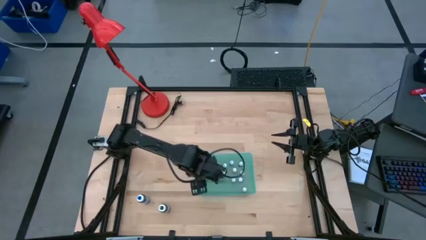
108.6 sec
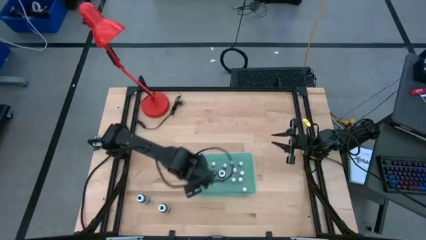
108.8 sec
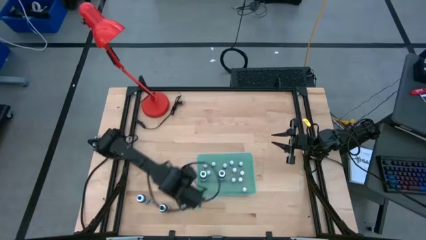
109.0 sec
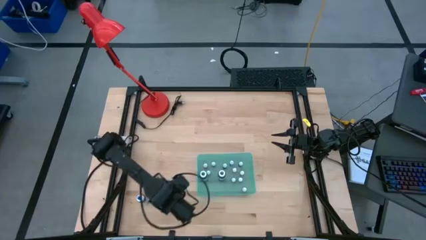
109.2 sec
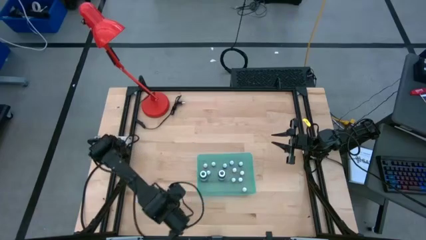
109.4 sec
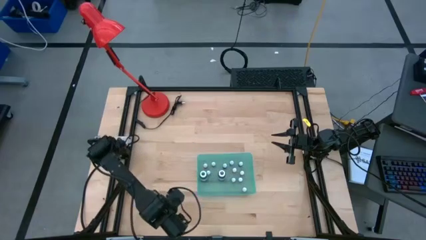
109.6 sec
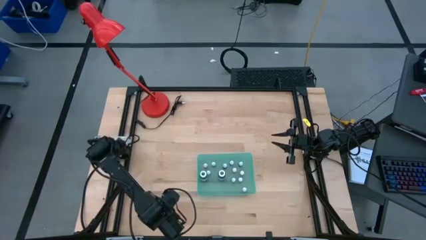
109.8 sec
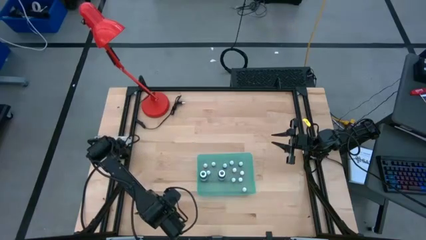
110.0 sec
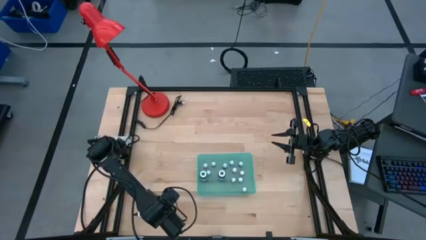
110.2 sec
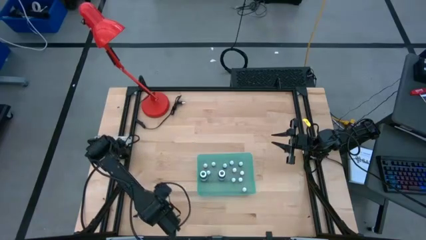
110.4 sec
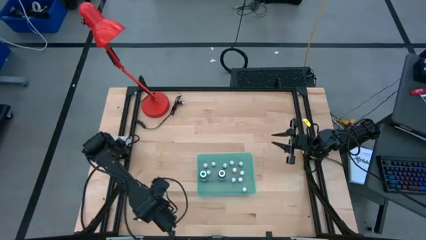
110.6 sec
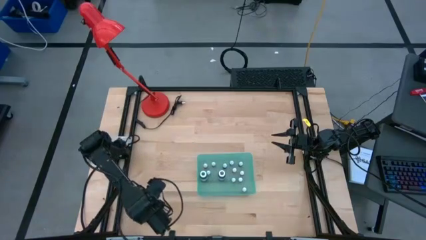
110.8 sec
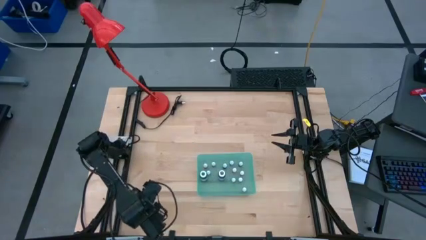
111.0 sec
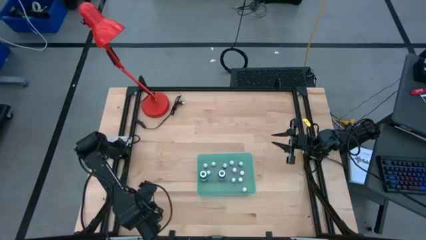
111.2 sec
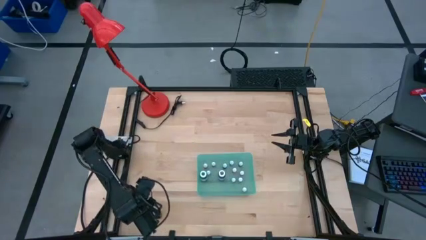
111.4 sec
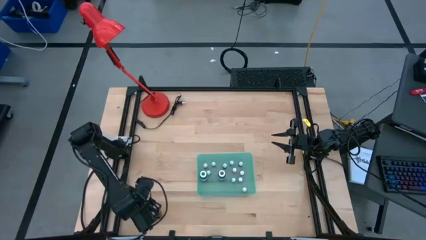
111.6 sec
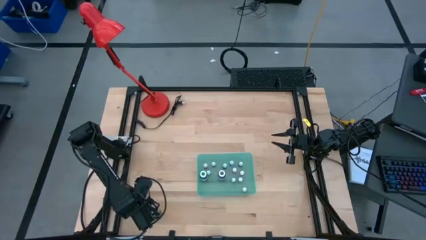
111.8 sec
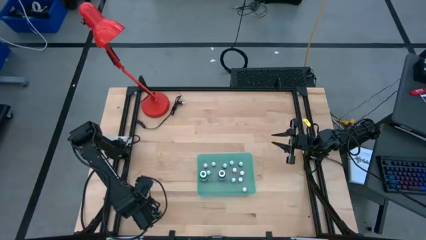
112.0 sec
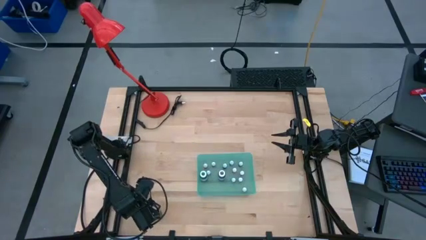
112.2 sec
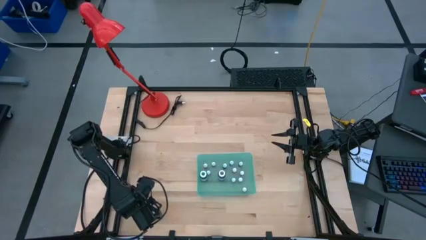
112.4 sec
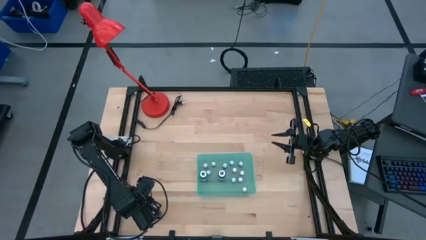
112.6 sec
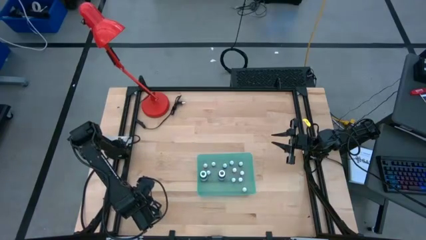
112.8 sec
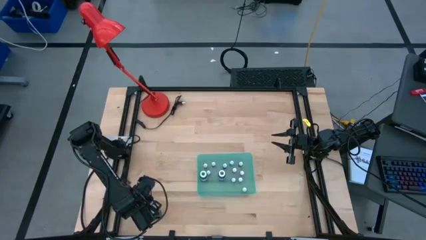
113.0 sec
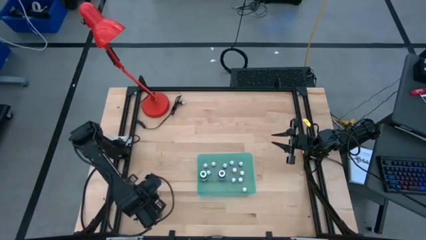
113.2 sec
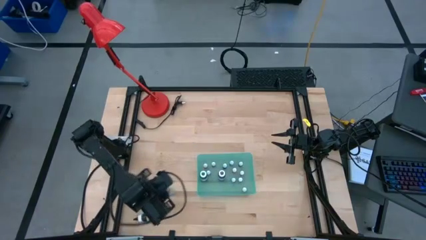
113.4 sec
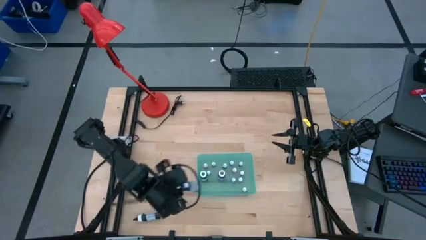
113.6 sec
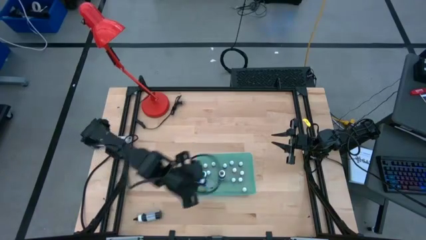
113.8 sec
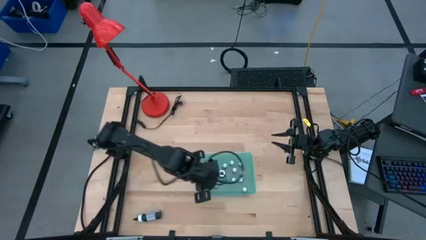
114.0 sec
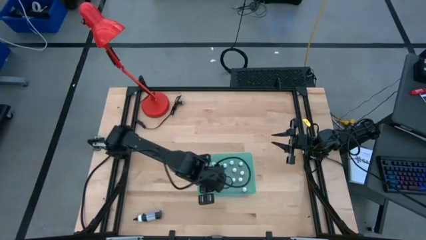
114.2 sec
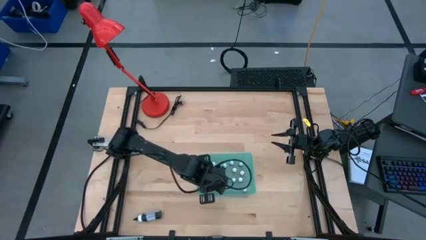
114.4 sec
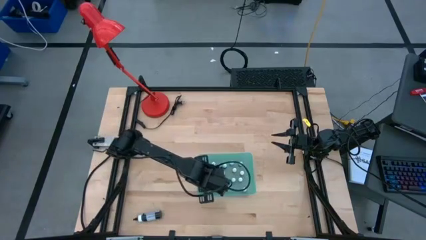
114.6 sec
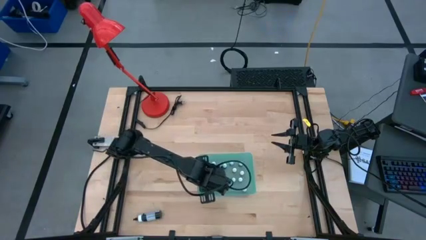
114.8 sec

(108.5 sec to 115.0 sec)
Task: Pick & Place food coloring
Put the large blue food coloring bottle into the green bin

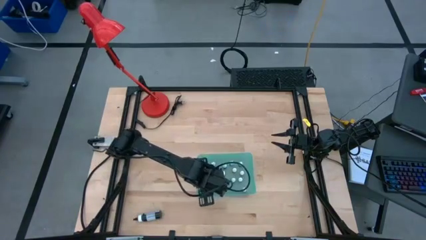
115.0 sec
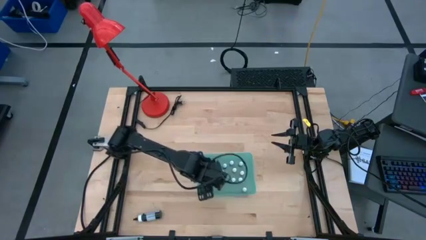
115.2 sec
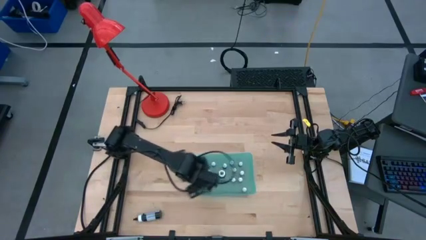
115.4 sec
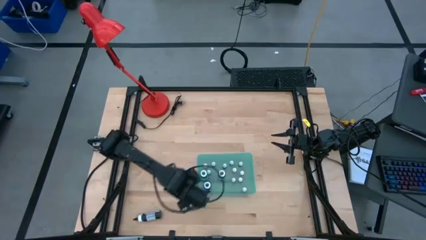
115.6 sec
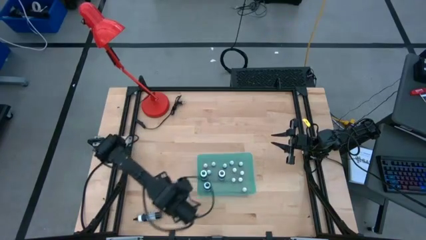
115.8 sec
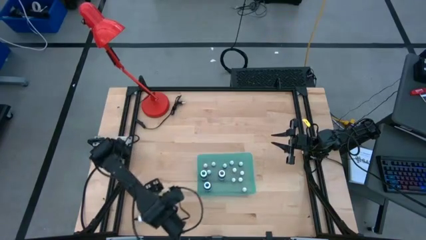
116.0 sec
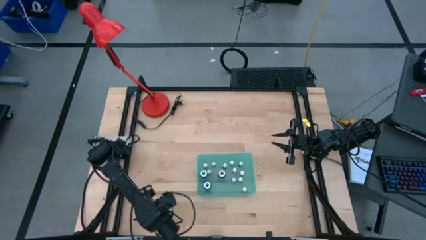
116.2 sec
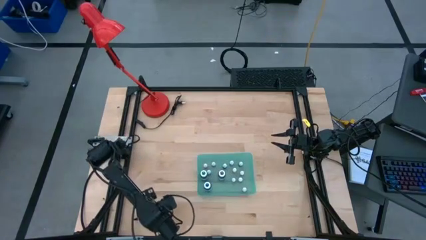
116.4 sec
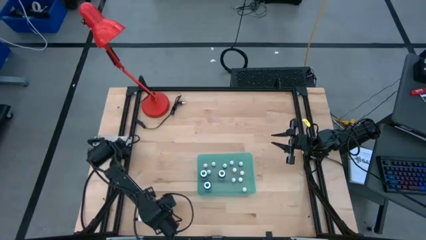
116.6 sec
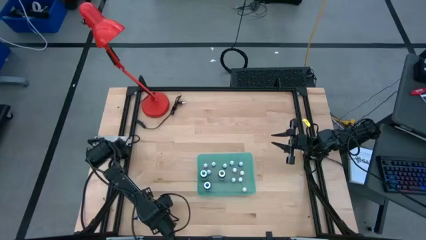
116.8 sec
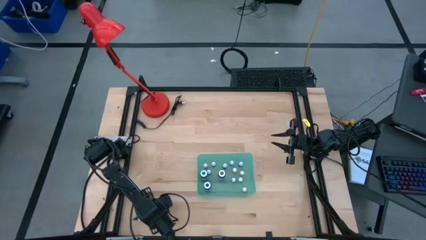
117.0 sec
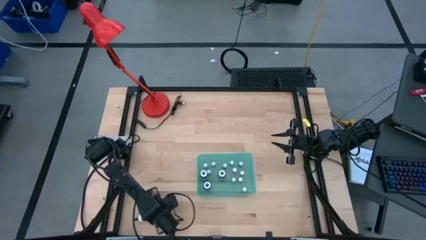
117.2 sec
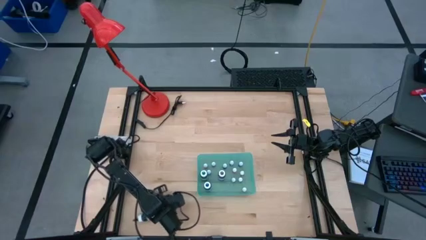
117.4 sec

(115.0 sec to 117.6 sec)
Put the large black food coloring bottle into the green bin

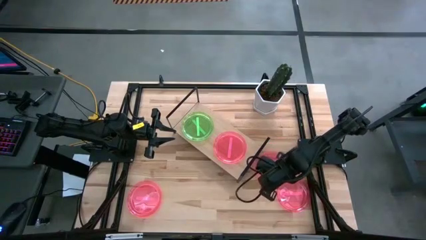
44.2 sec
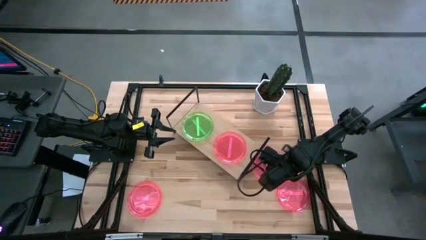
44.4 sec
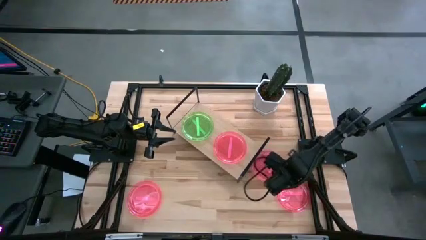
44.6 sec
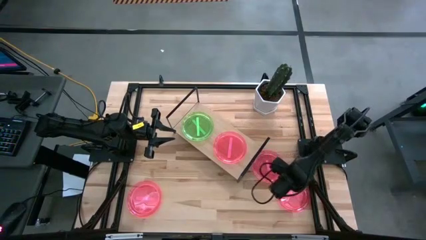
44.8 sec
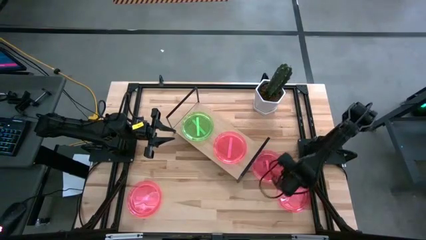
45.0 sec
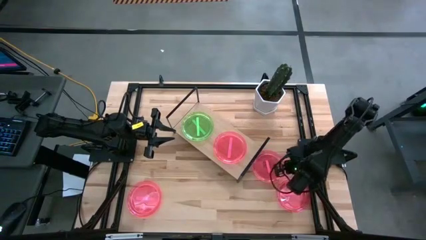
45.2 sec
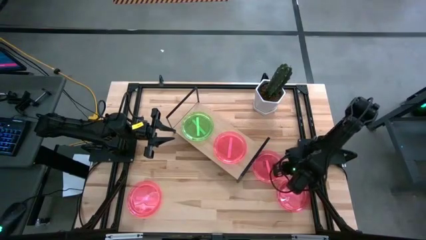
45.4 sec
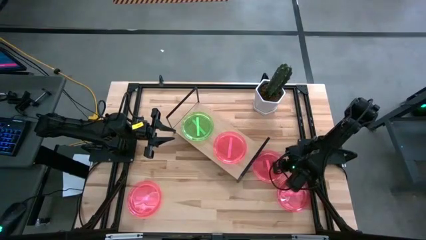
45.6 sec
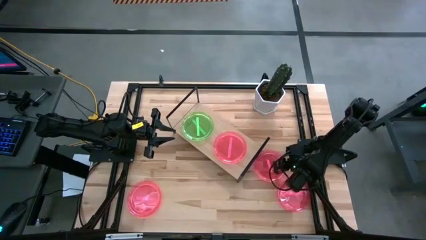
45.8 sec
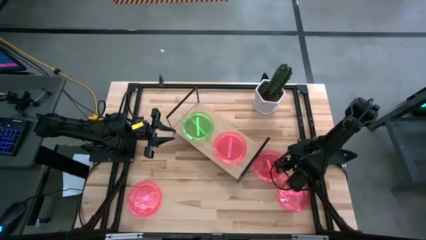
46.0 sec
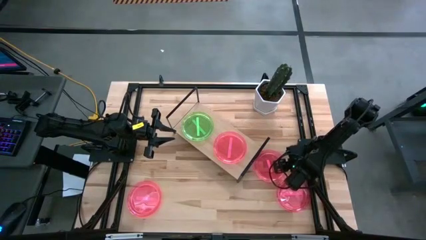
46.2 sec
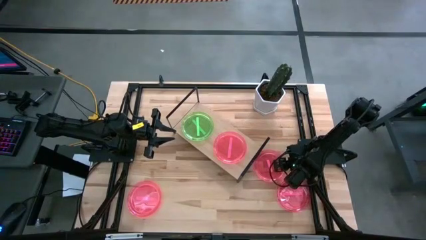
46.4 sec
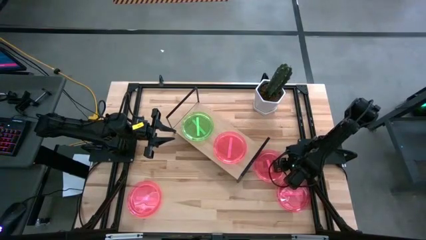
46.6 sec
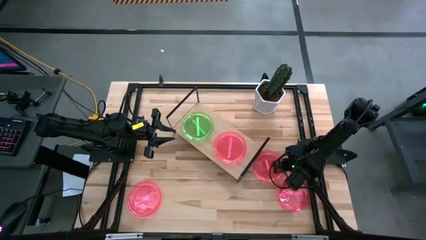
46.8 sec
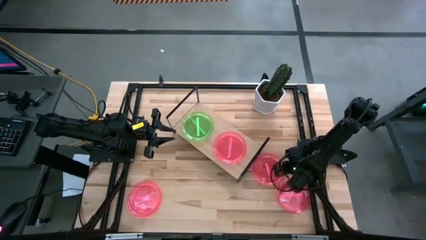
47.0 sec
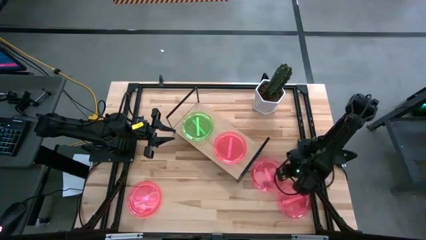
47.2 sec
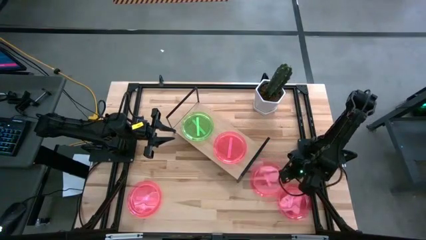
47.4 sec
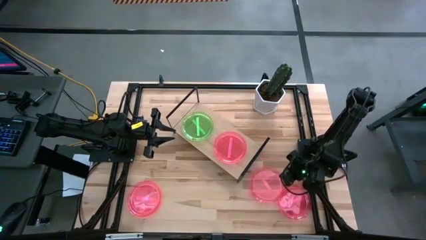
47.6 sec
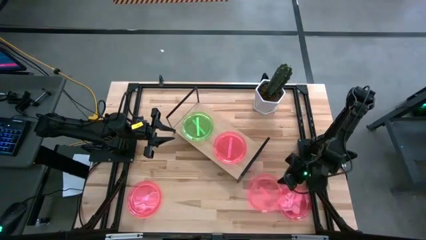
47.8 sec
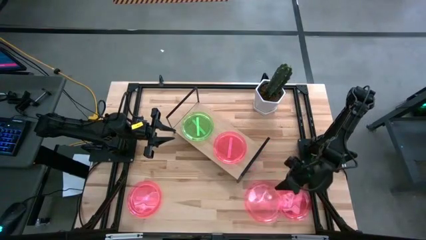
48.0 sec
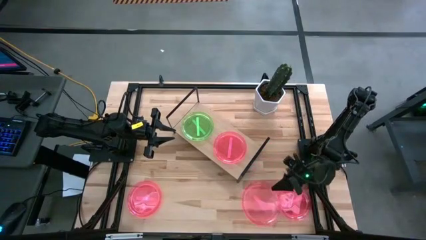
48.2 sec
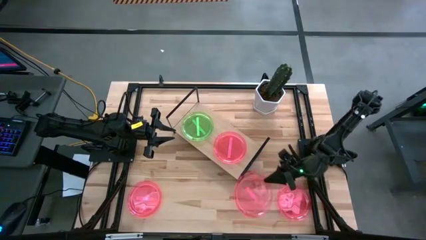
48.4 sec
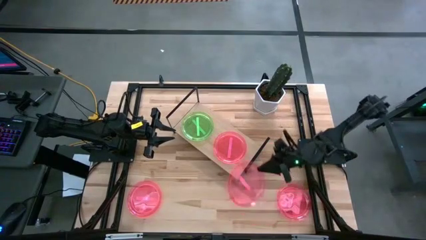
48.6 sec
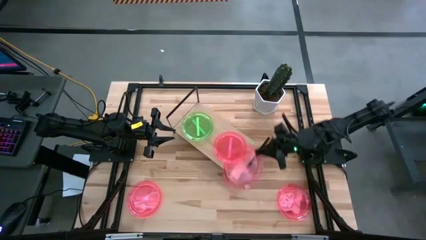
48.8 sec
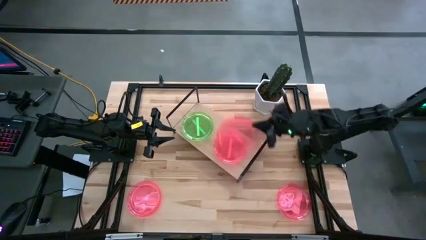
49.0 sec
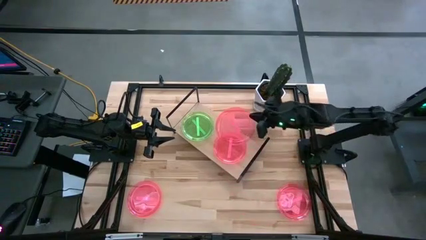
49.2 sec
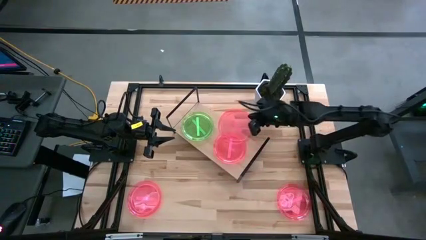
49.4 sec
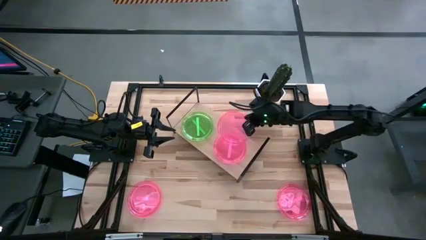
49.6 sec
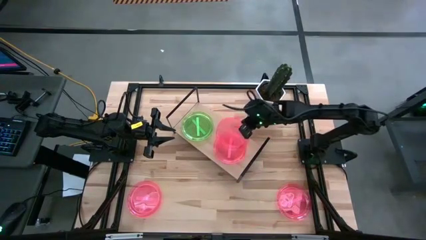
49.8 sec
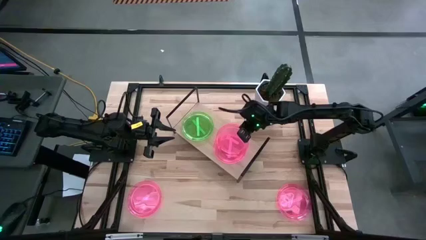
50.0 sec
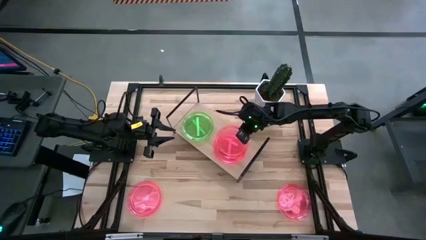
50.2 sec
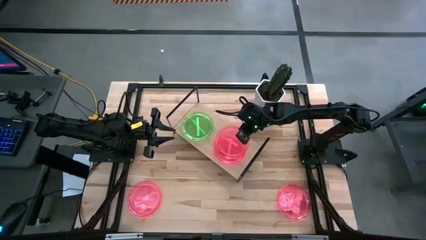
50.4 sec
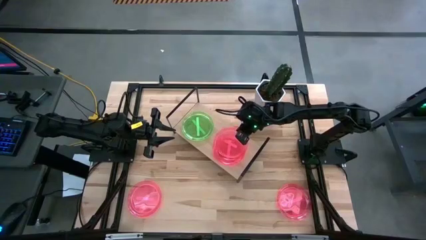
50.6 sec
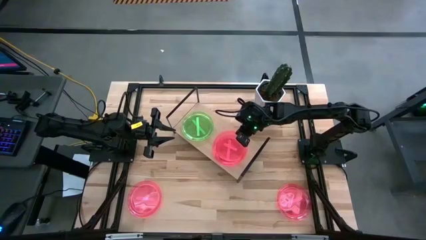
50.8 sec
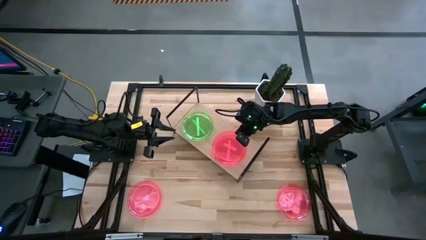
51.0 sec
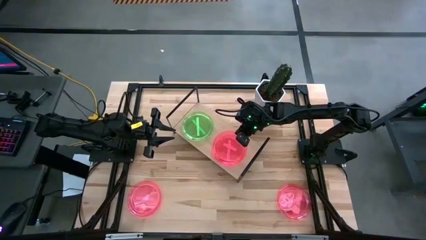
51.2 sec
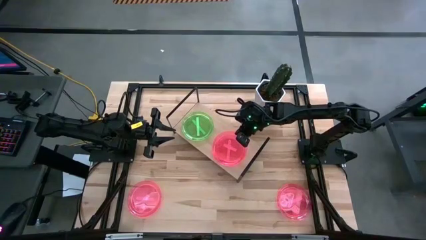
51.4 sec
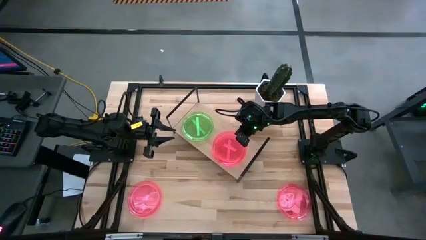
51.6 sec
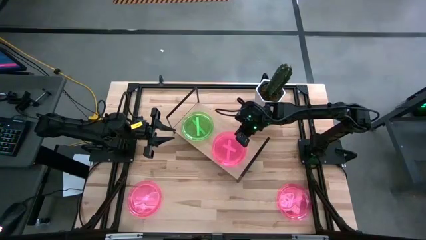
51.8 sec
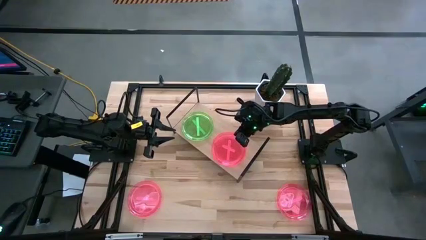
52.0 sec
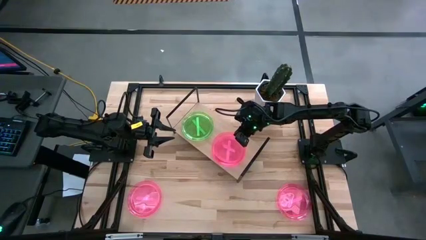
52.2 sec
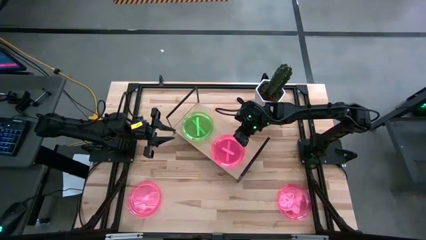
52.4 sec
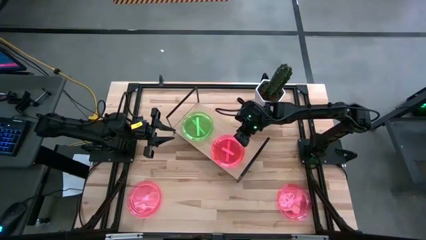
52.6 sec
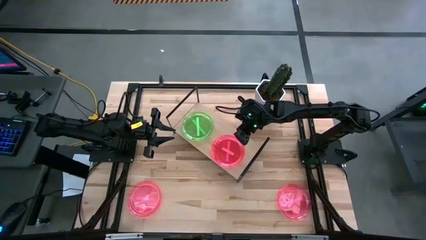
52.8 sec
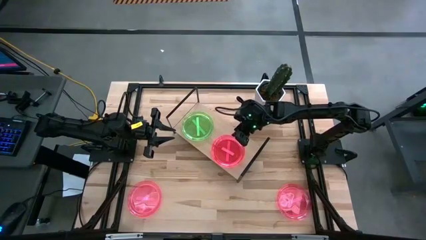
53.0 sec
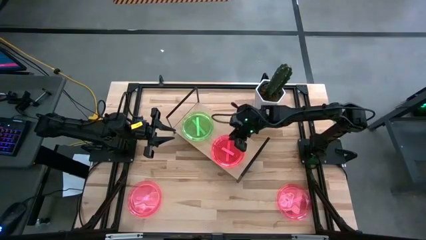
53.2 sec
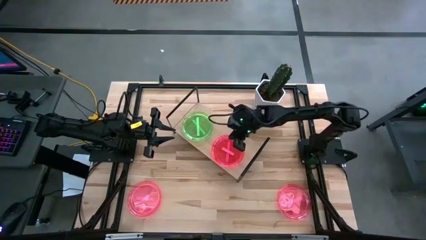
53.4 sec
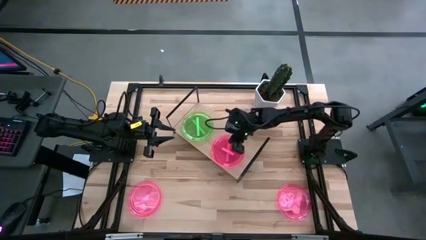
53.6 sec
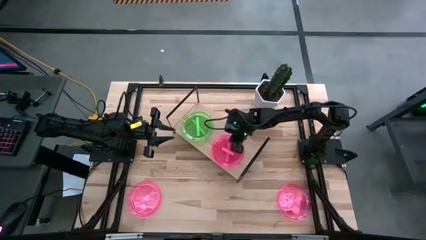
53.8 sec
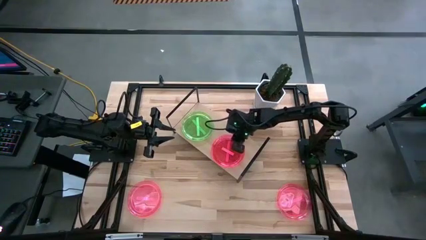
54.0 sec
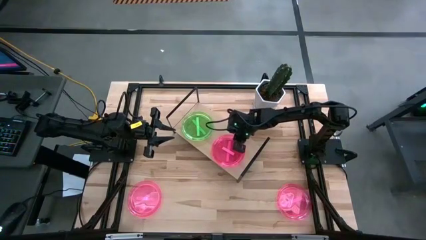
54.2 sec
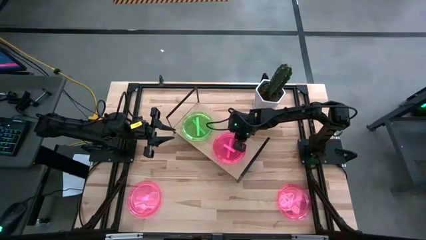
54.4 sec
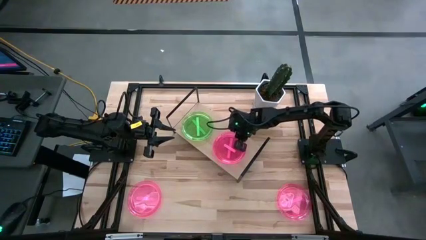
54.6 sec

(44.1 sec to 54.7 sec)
Task: Place and stack plates onto a shelf
Stack the pink plate on top of the other pink plate on the shelf
